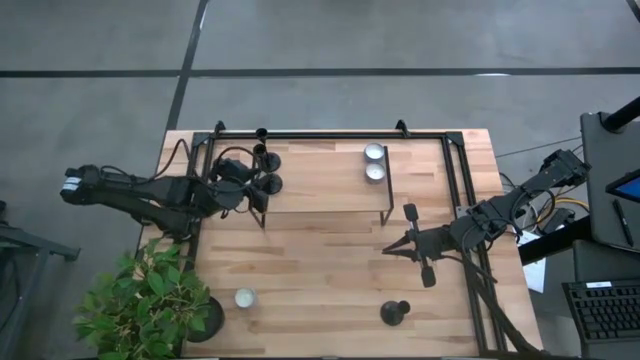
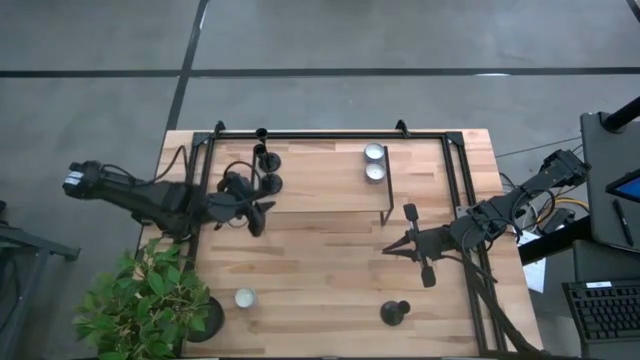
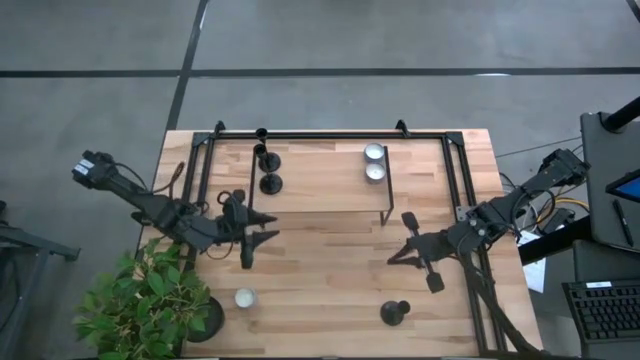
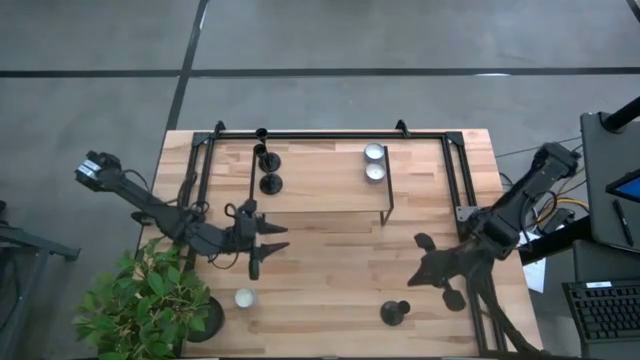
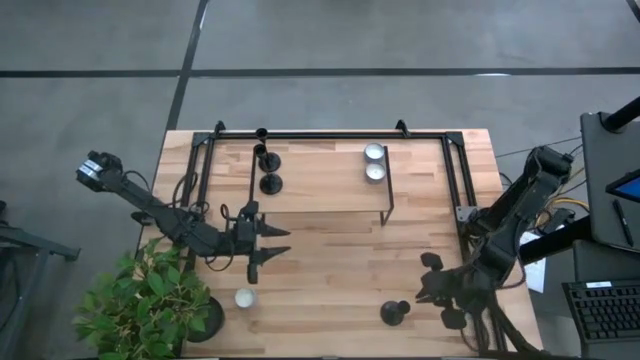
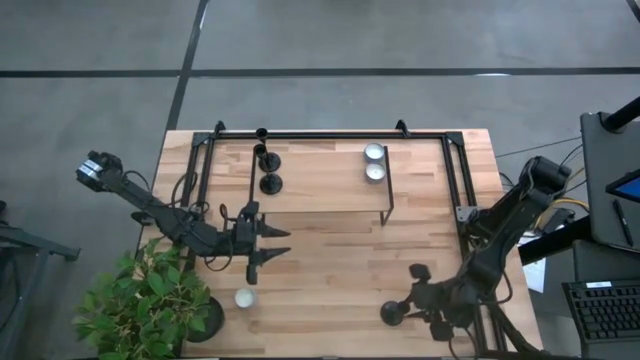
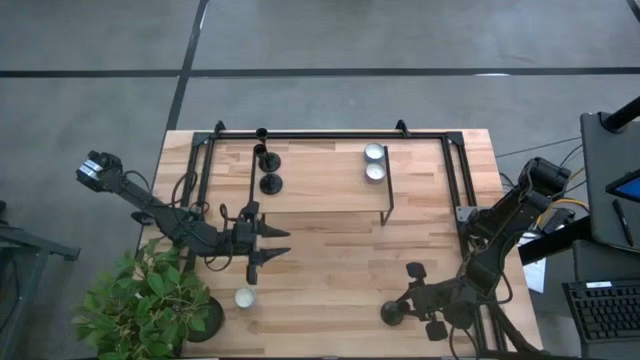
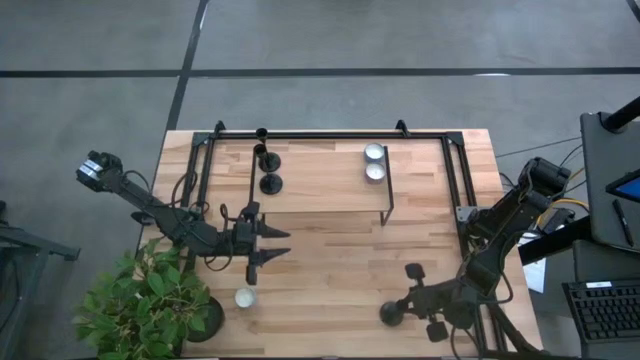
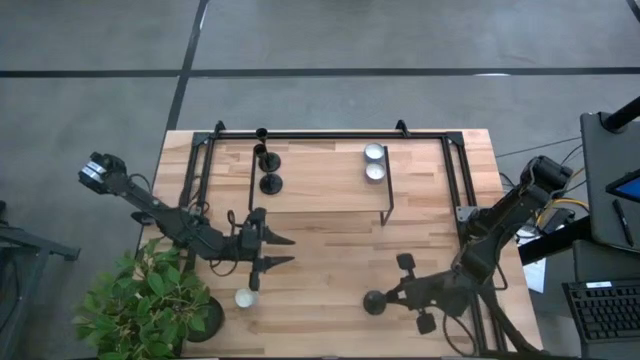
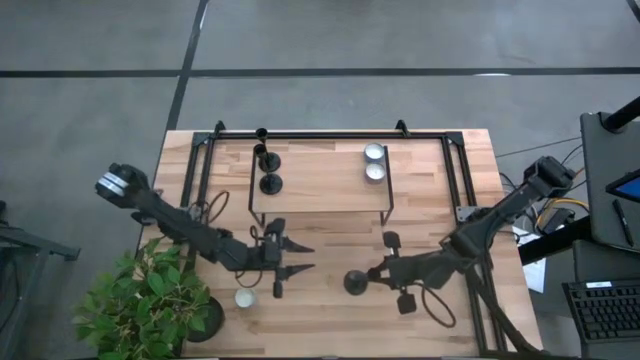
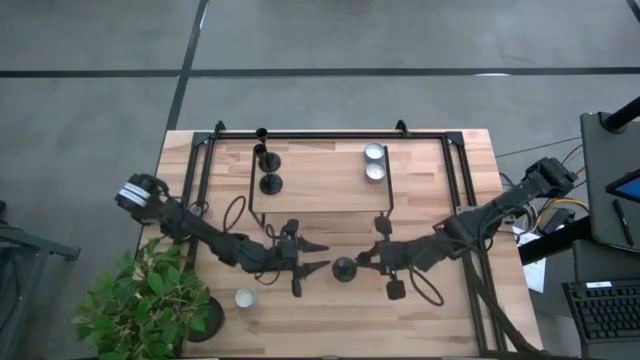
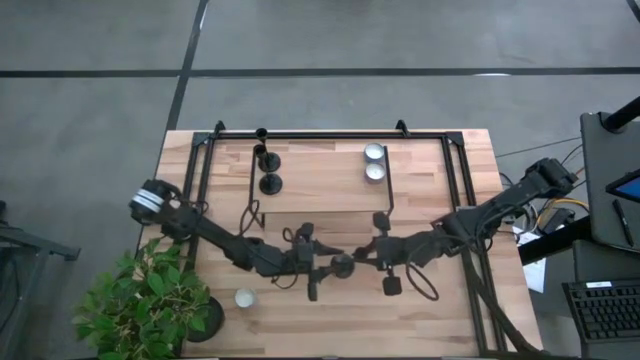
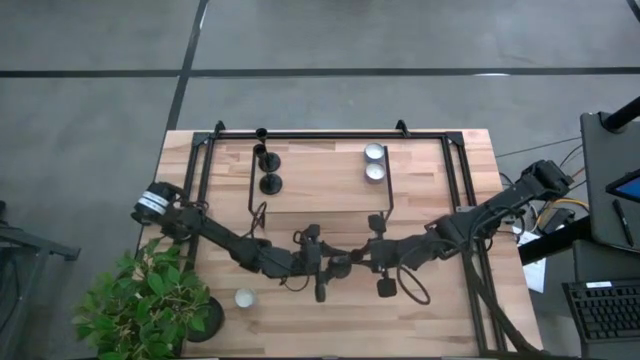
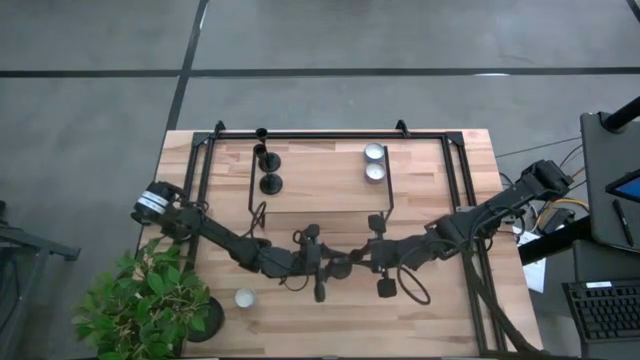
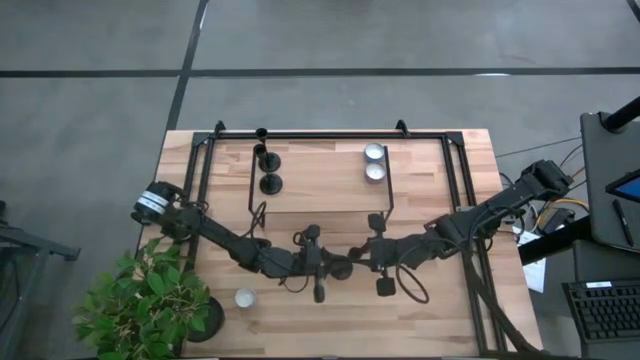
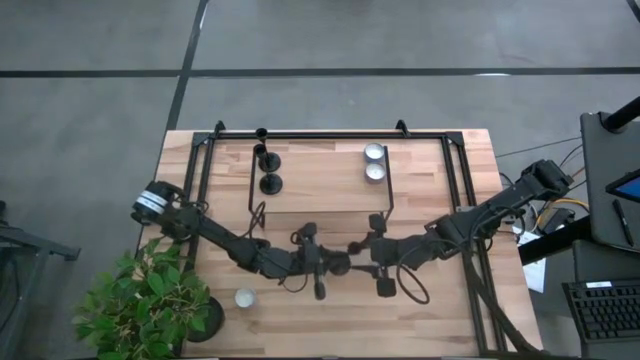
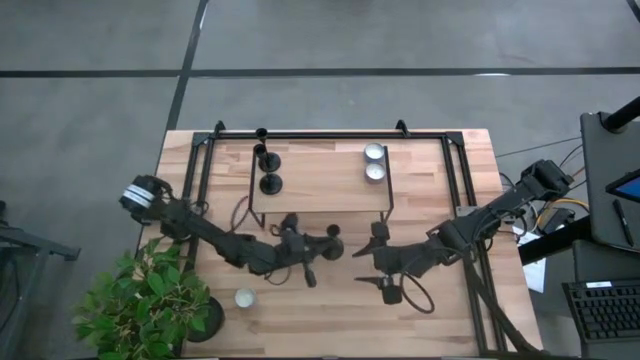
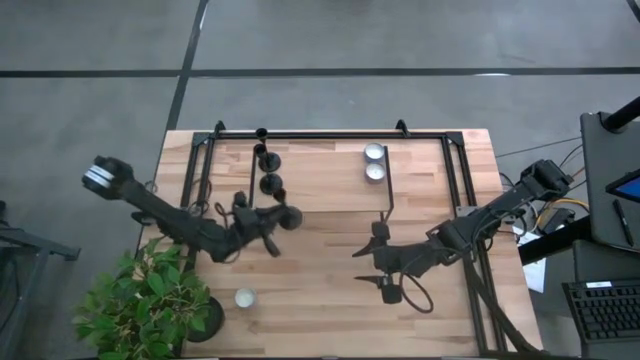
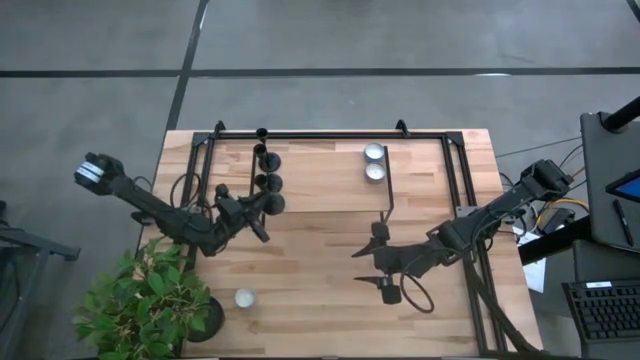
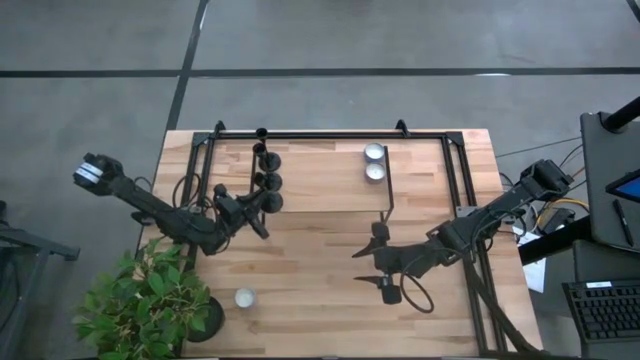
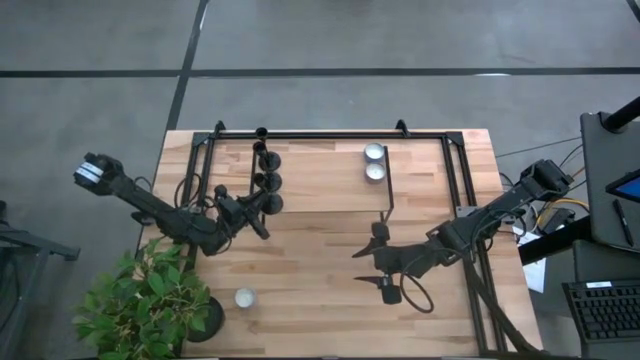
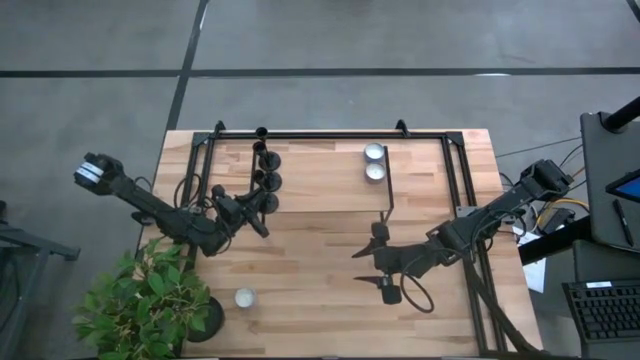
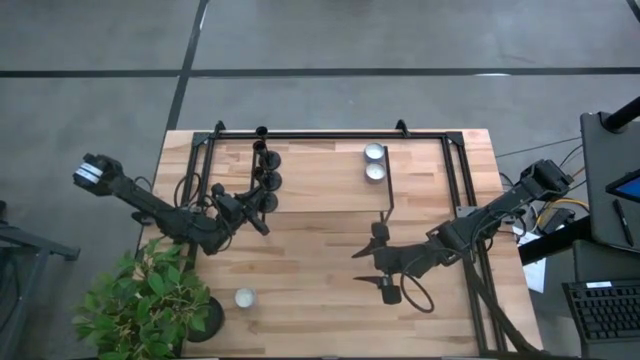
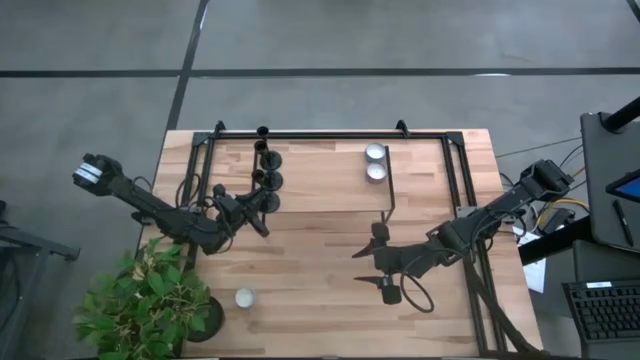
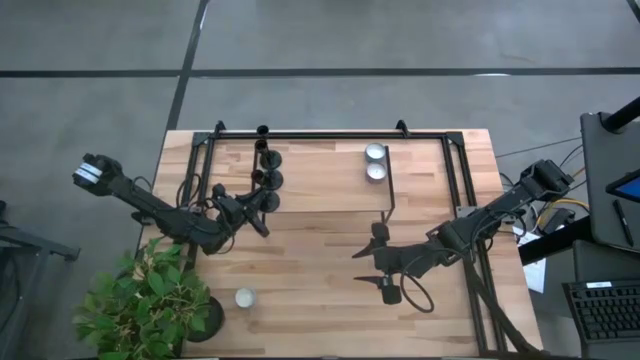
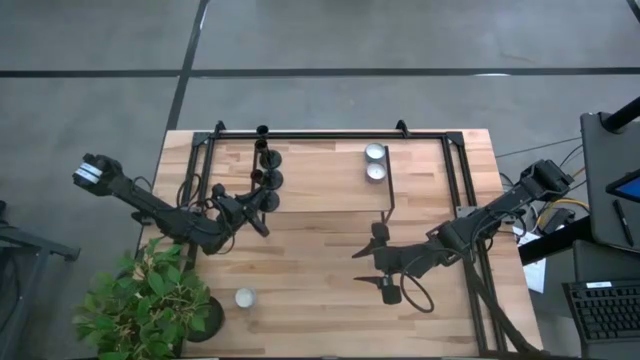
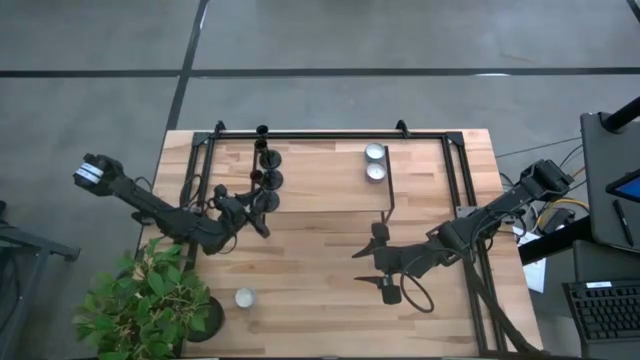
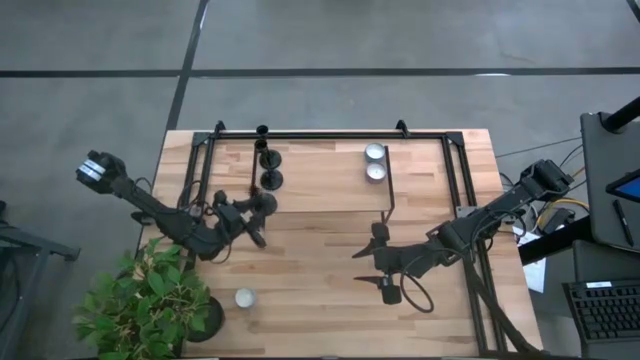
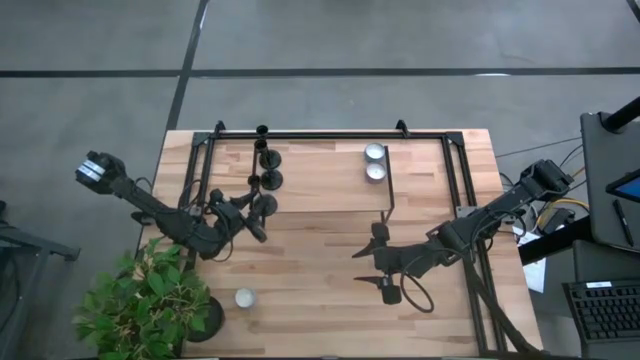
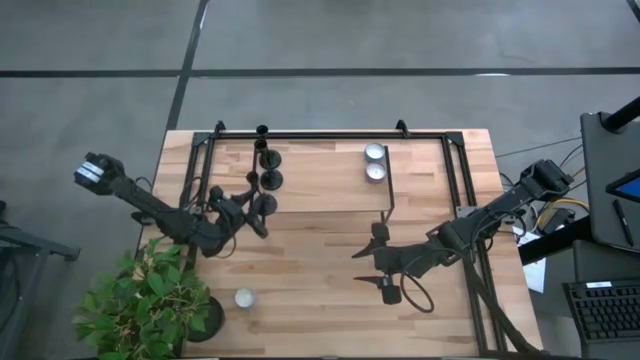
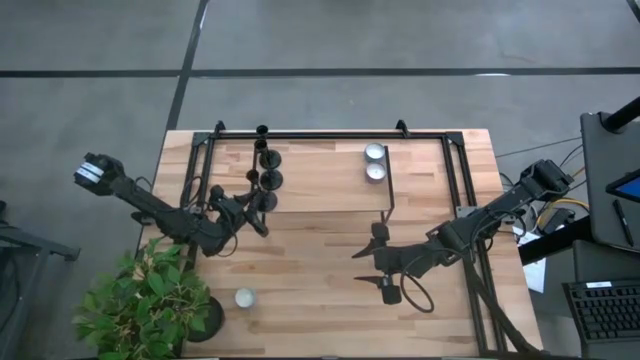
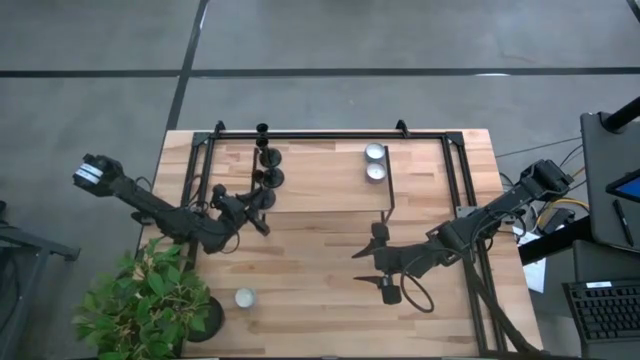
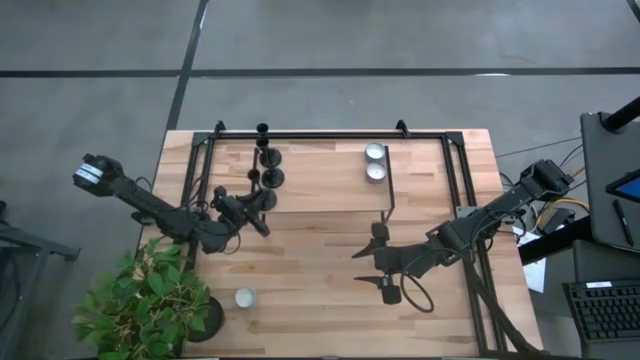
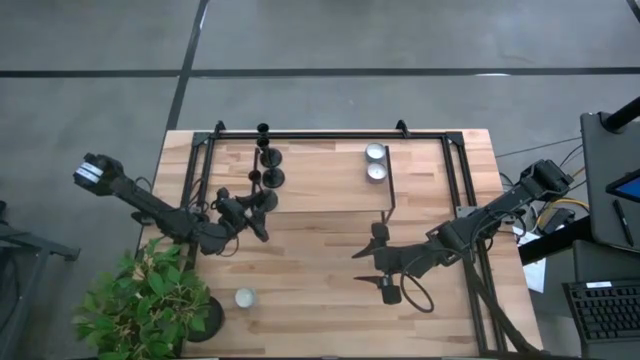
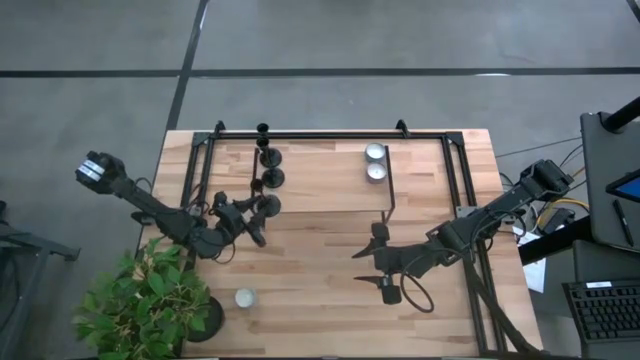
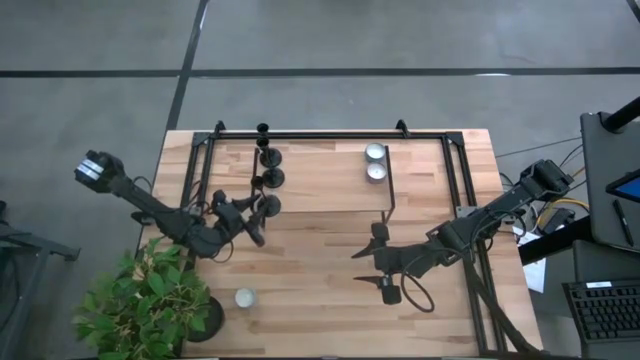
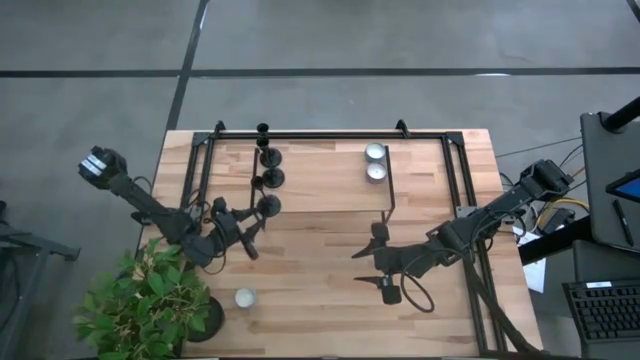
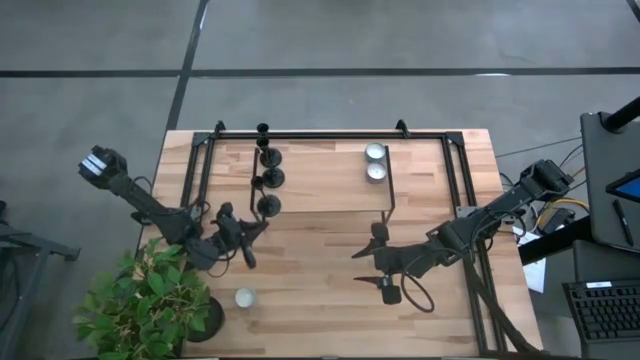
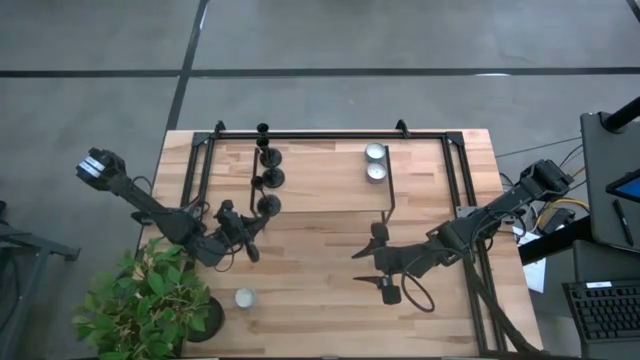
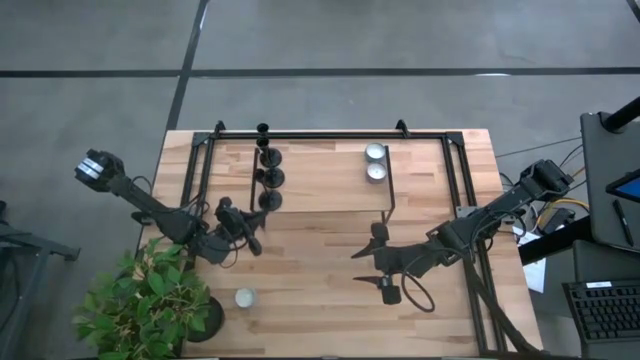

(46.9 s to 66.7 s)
Task: Pick & Place candle stick holders
Put the black holder on the shelf

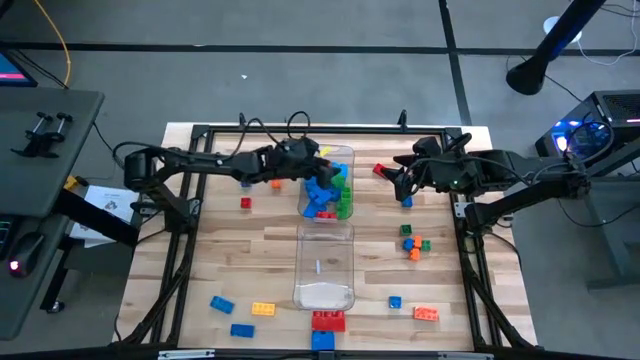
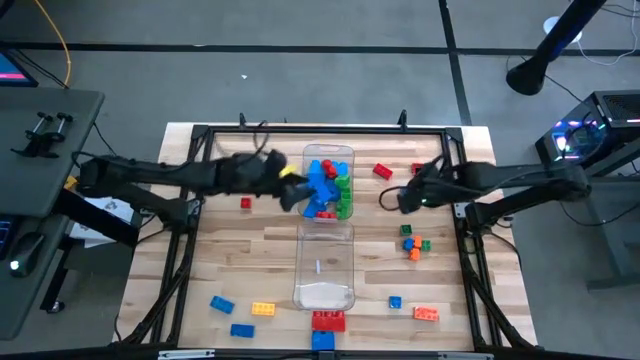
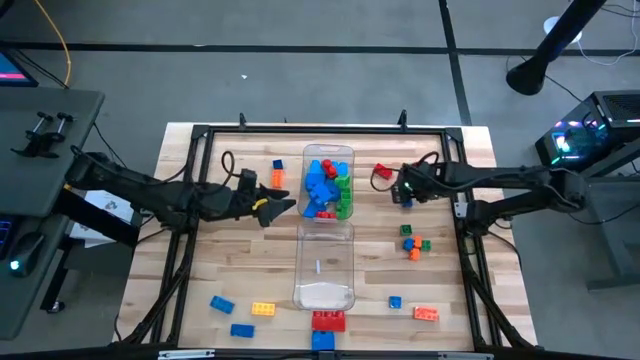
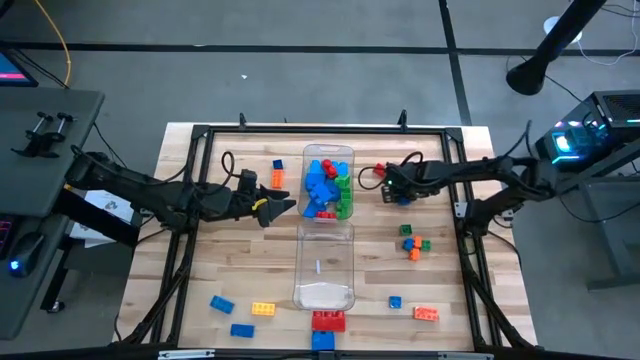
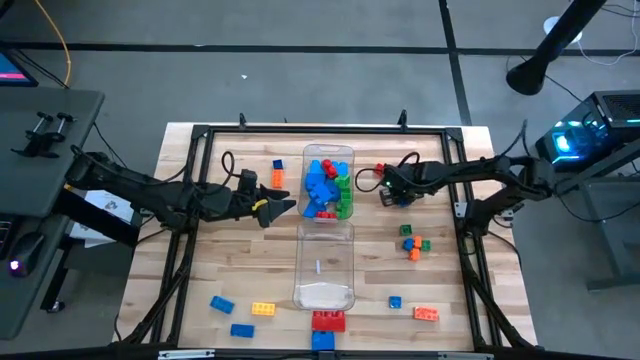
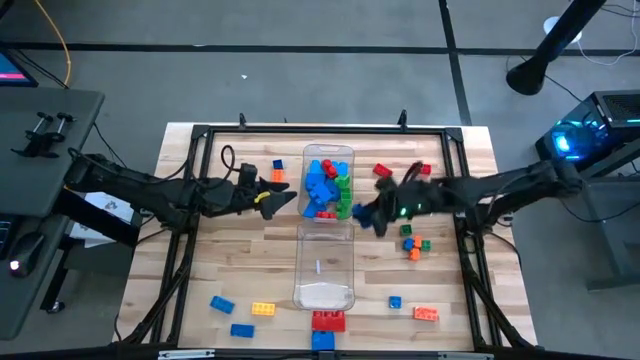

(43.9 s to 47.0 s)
Task: Sort blocks by size
Put the small blue game piece in the bottom transparent bin
